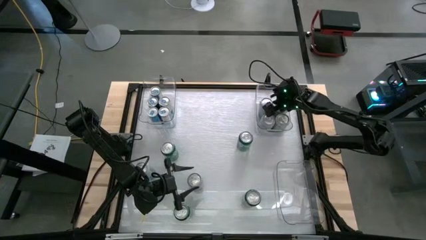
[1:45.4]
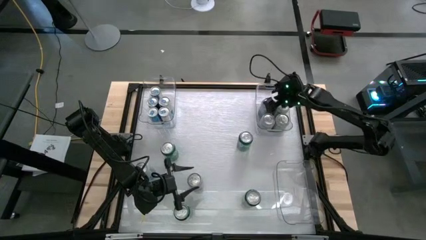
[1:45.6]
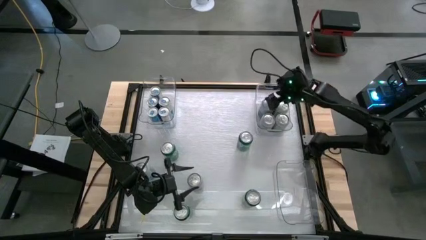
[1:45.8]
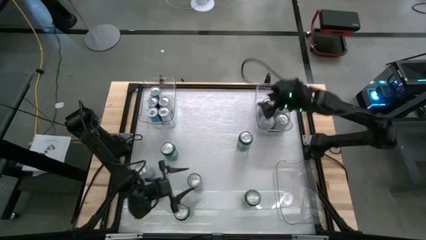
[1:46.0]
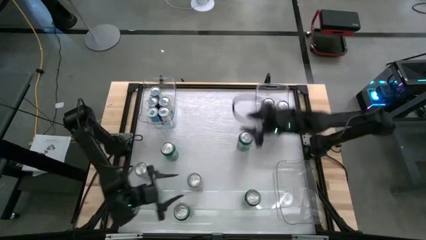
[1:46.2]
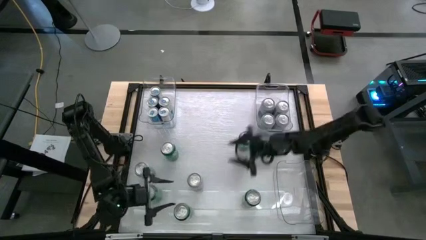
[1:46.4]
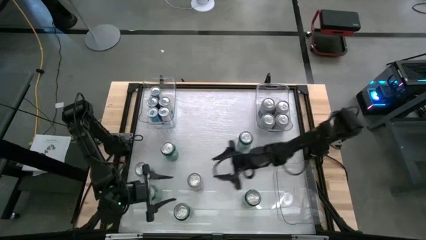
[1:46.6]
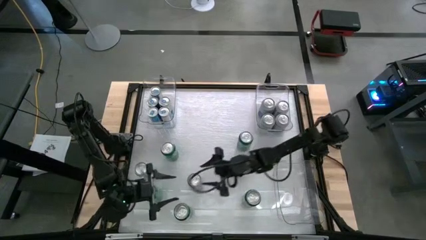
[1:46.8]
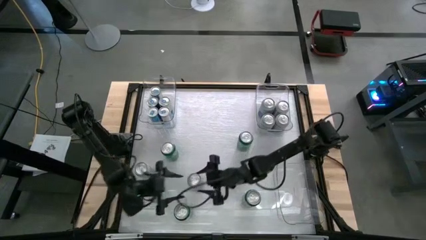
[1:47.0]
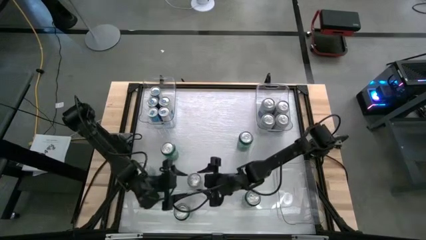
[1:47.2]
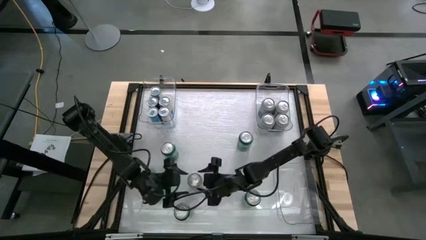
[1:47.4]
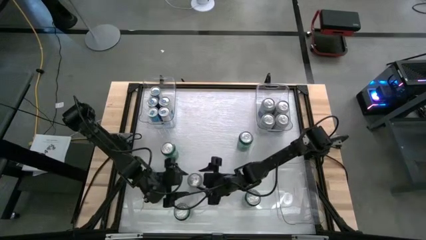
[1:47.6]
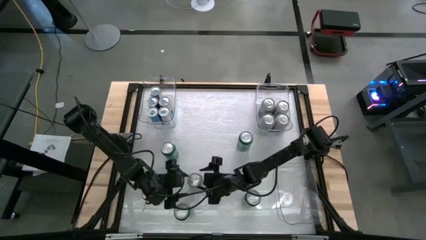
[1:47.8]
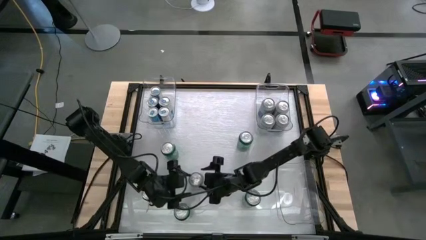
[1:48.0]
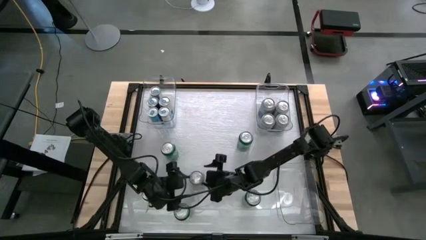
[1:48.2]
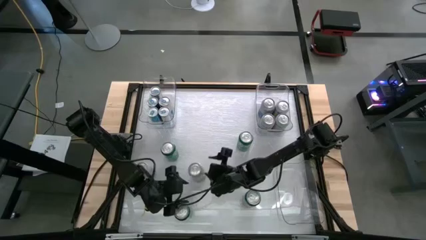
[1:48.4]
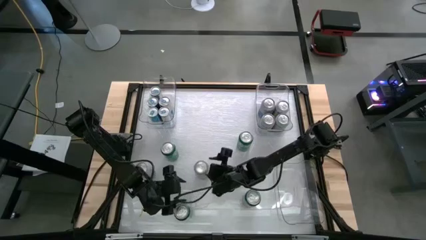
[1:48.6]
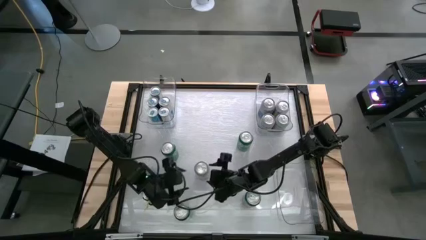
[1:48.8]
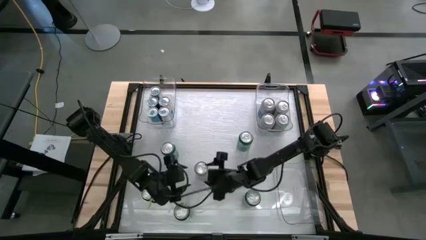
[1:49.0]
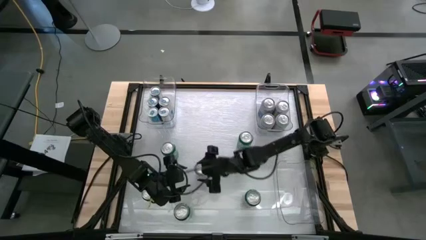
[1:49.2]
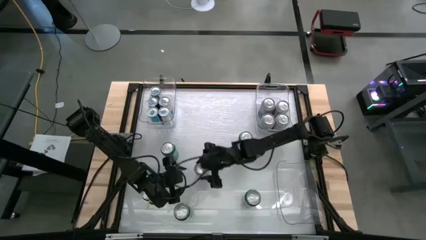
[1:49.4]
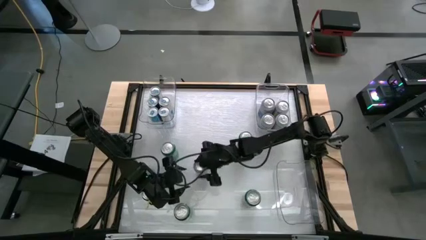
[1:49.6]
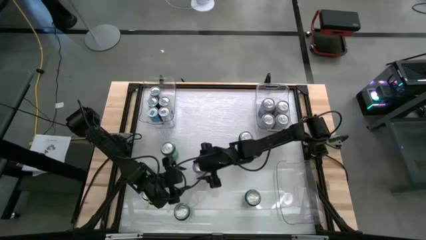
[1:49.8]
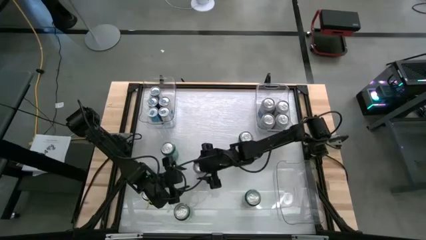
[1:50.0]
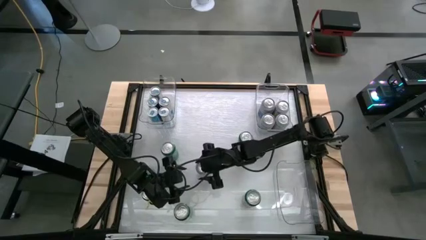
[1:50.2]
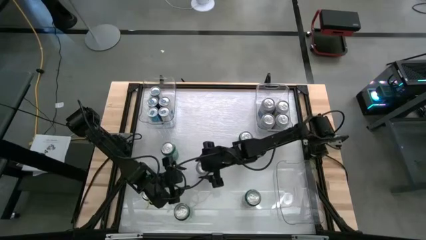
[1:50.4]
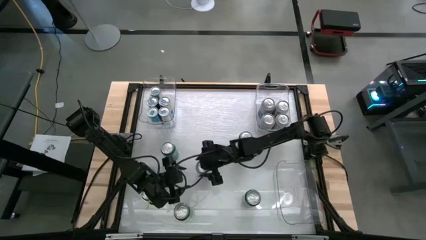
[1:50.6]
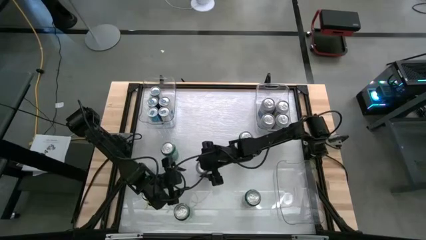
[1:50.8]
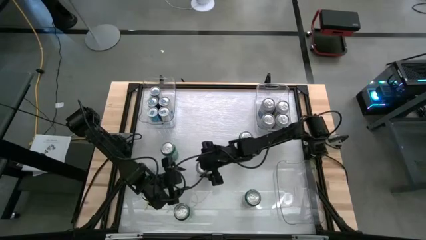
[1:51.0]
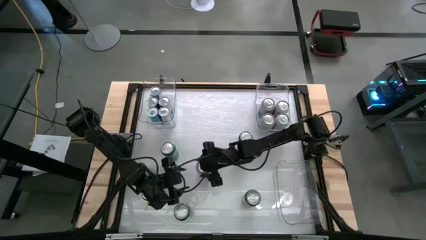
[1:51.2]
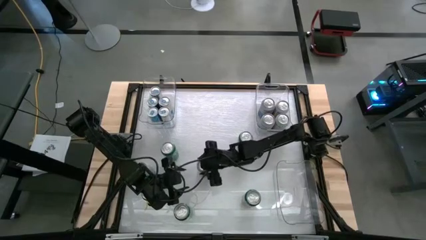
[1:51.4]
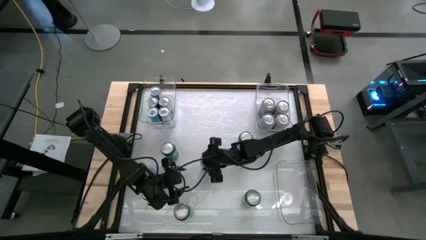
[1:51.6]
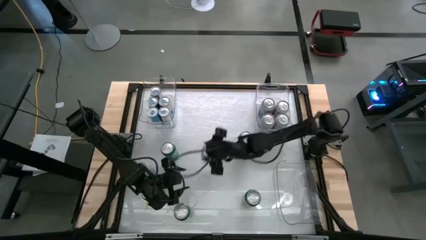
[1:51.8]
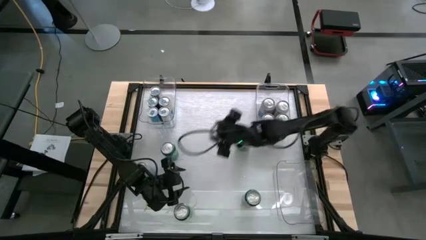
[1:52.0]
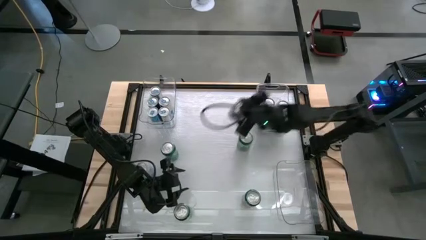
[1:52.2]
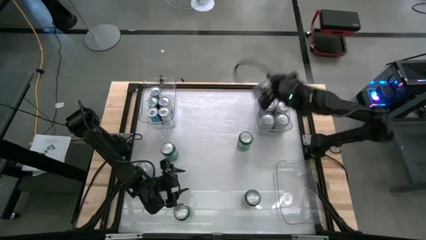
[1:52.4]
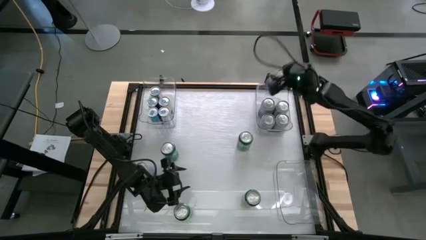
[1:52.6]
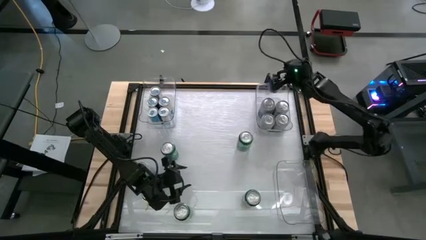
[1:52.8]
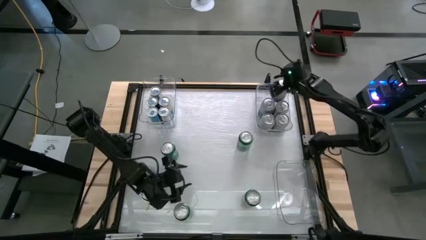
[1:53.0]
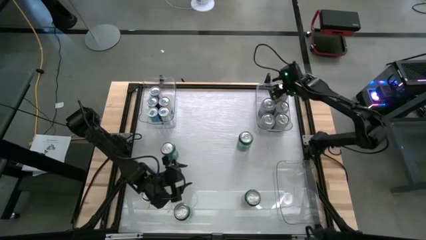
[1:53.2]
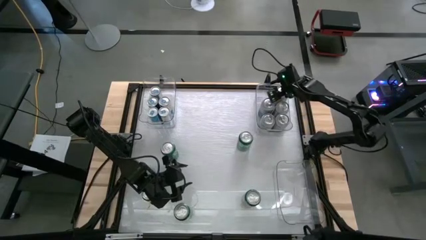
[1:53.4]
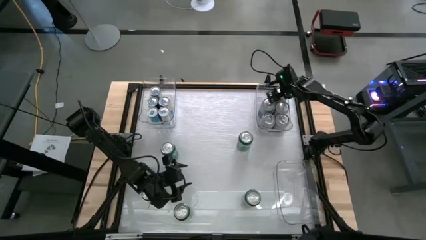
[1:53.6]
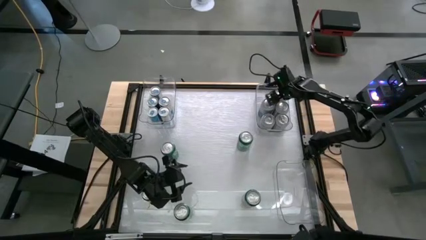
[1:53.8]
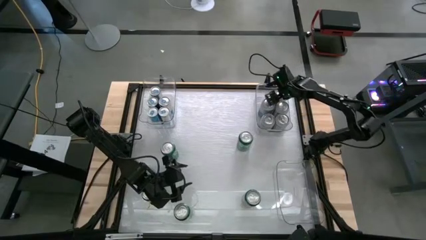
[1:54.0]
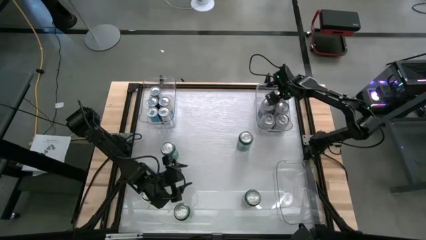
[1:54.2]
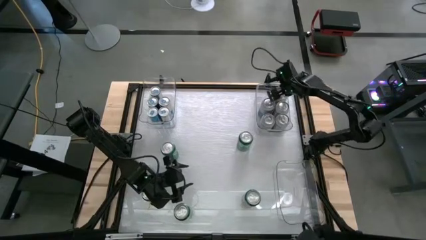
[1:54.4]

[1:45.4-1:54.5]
Task: Sort soda cans
Put the blue-white soda can into the top right transparent bin

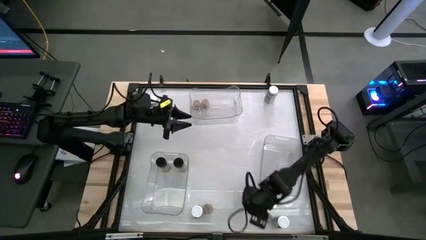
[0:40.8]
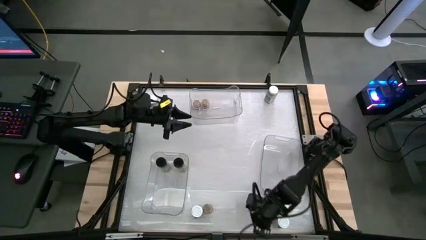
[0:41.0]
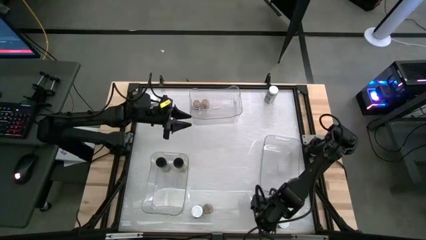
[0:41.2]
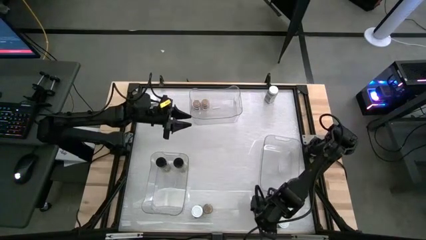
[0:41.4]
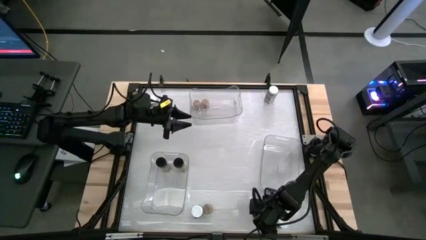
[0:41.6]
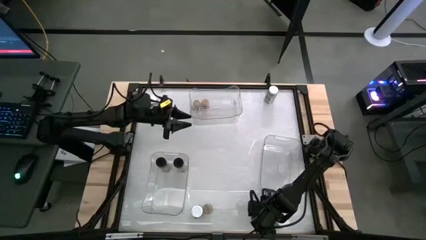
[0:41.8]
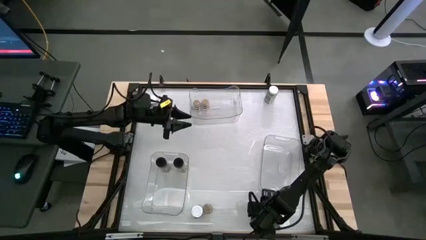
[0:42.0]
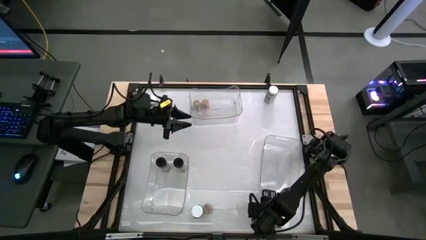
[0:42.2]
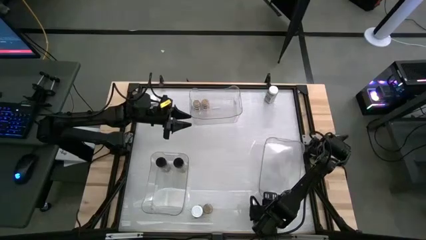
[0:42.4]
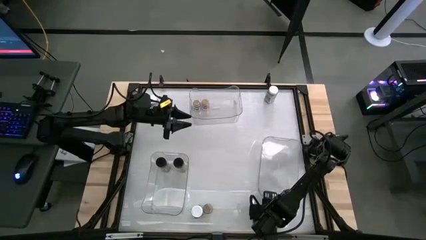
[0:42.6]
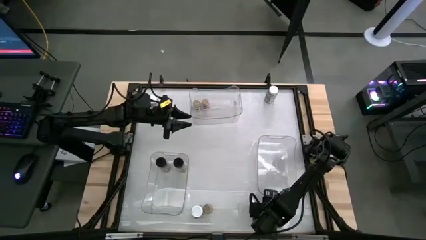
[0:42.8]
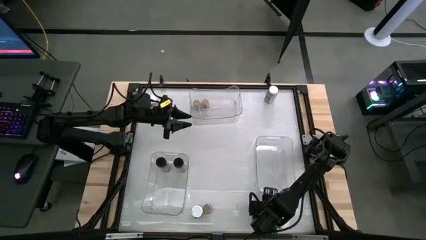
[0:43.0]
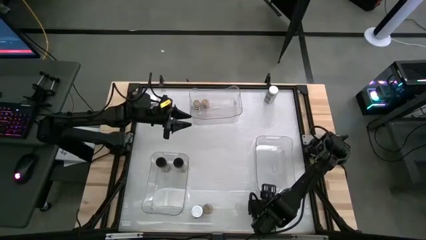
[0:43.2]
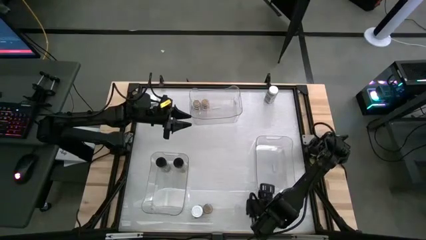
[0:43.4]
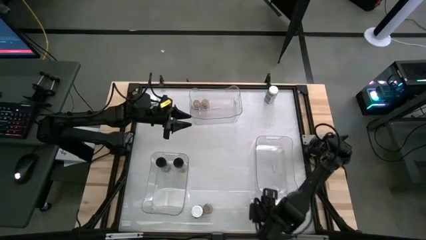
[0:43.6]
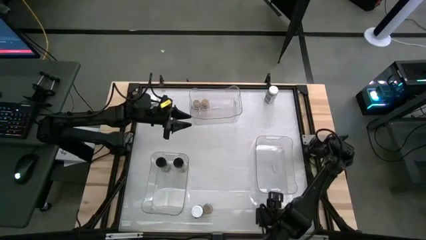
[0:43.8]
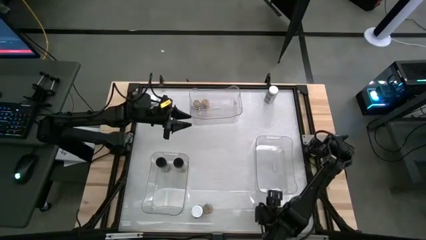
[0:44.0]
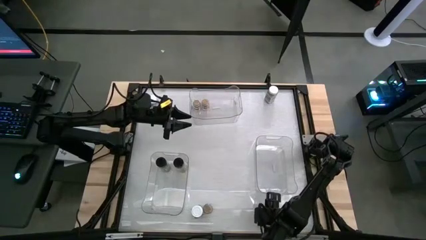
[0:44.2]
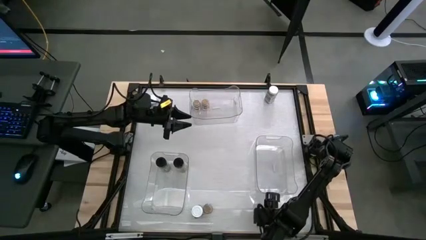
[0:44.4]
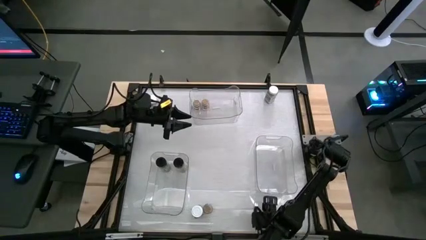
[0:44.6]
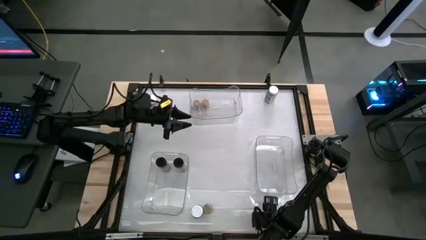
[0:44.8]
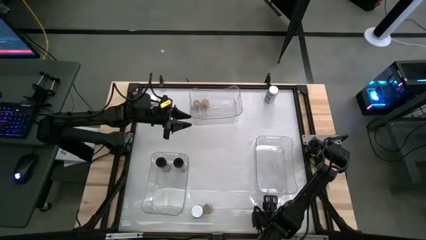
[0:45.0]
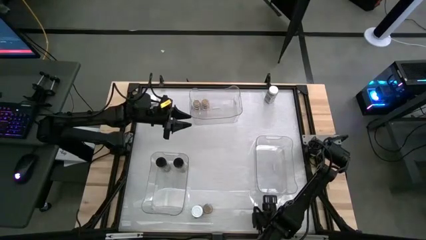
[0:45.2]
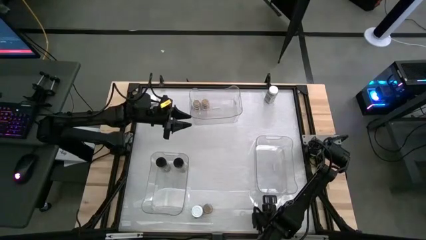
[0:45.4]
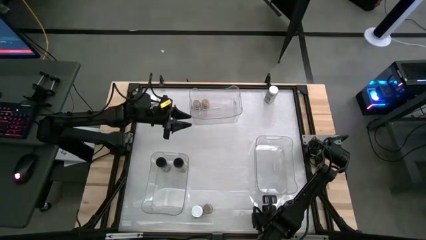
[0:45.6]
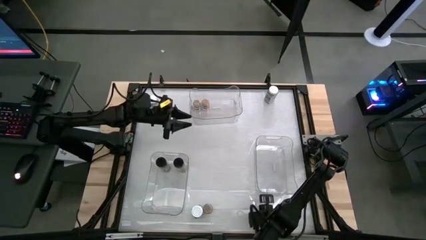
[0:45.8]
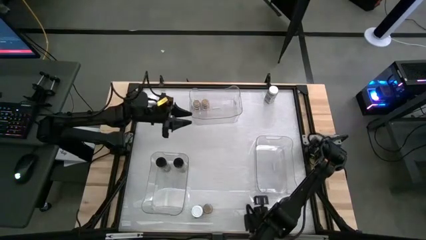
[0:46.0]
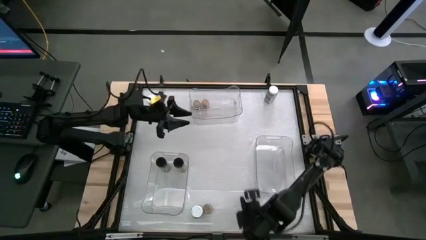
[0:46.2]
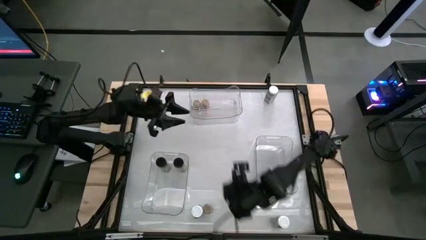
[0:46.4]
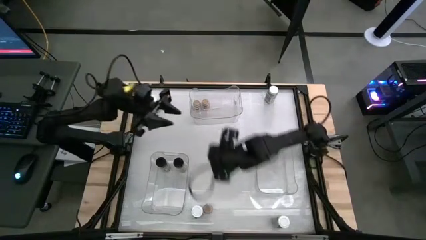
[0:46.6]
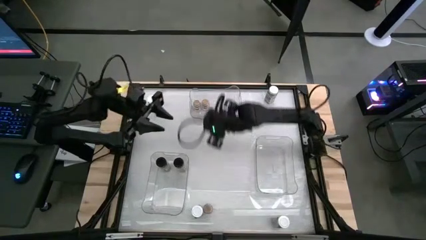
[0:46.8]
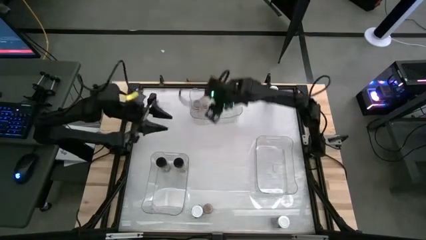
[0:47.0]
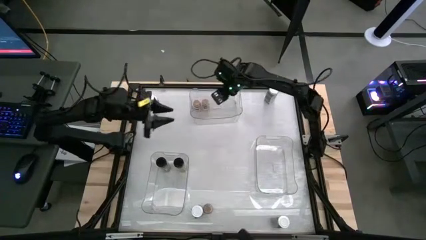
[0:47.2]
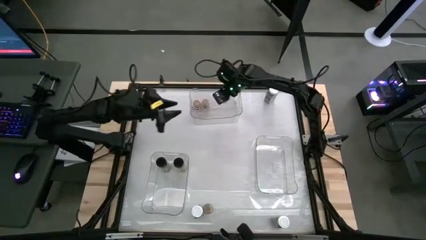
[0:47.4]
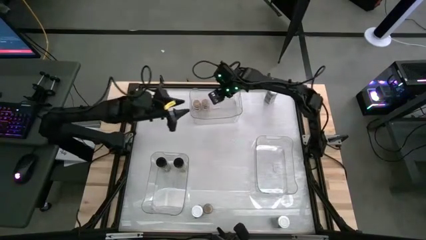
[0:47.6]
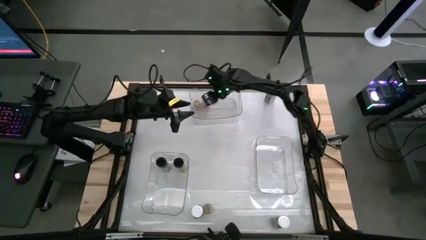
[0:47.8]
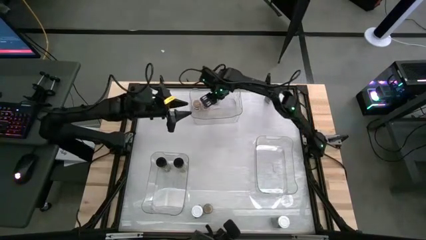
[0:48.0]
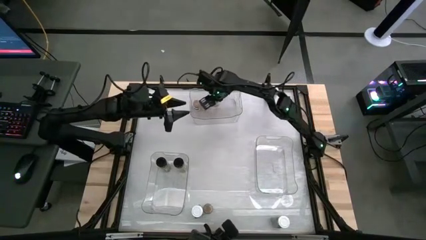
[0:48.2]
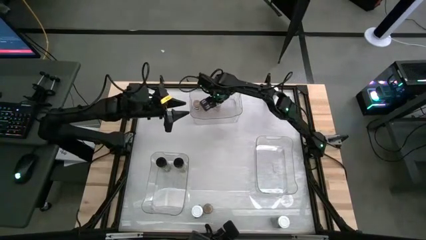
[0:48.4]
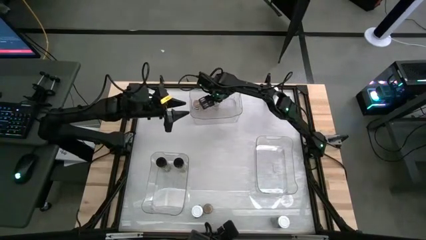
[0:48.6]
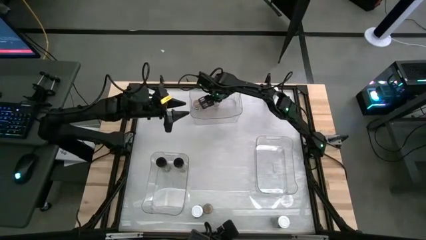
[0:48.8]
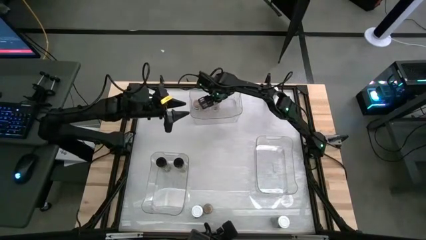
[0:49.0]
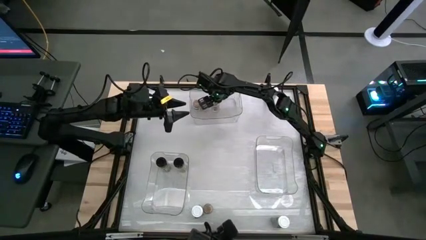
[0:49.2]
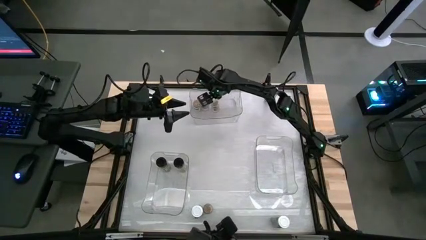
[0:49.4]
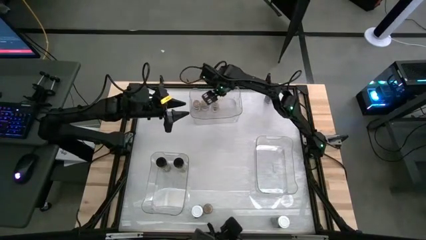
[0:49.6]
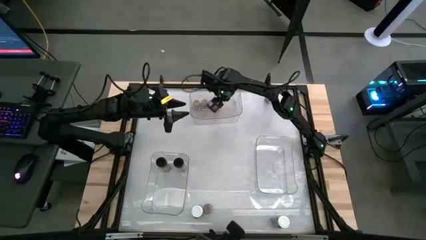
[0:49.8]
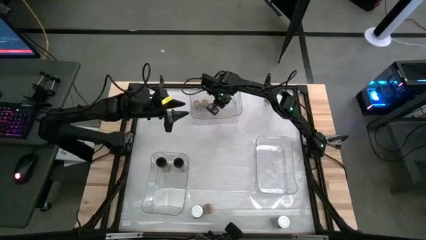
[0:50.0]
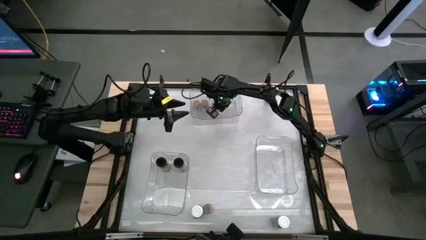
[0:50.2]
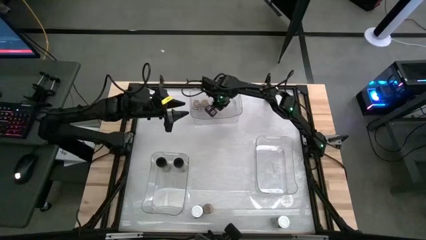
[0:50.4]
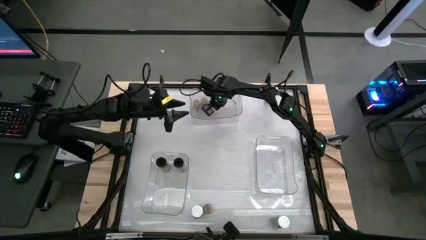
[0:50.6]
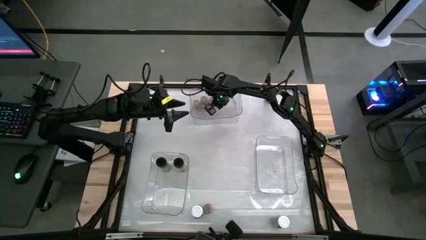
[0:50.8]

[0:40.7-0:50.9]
Task: Sort spices by type
Put the brown seasoning bottle into the middle transparent bin
